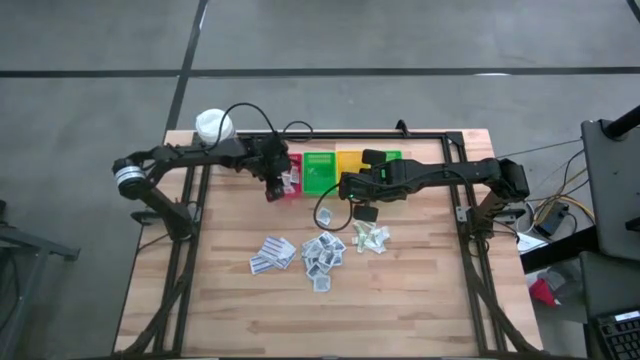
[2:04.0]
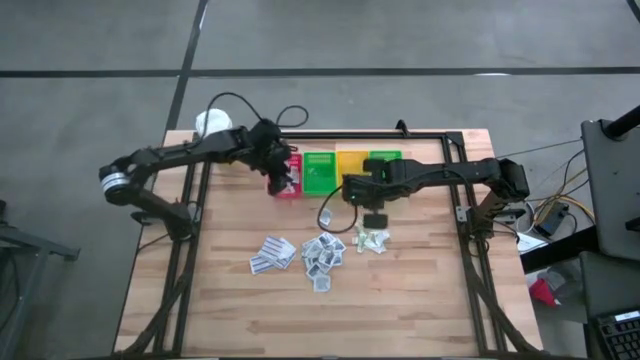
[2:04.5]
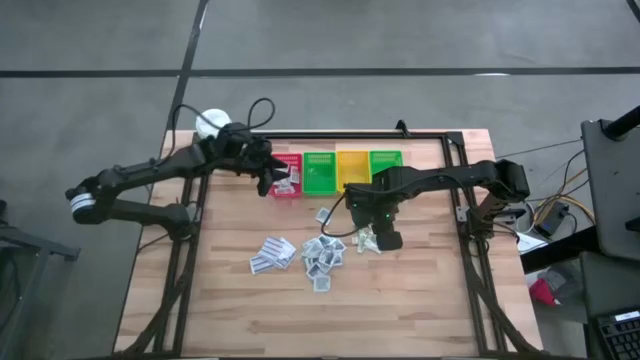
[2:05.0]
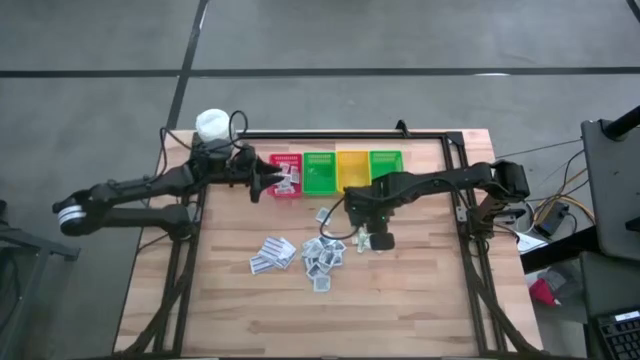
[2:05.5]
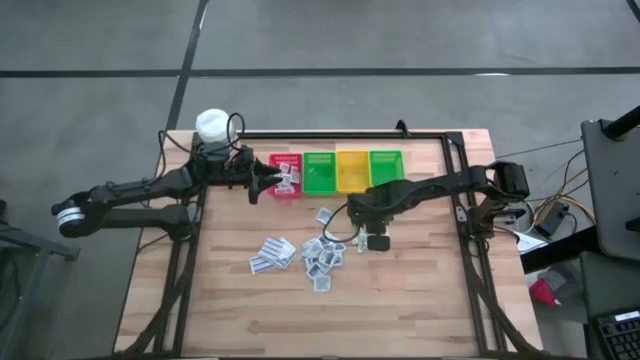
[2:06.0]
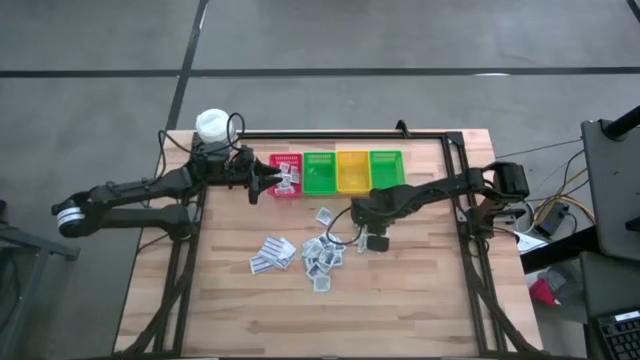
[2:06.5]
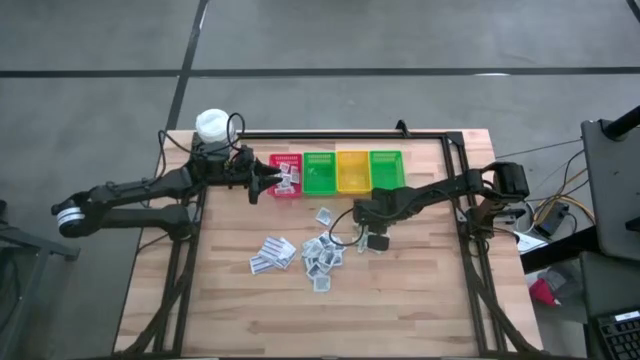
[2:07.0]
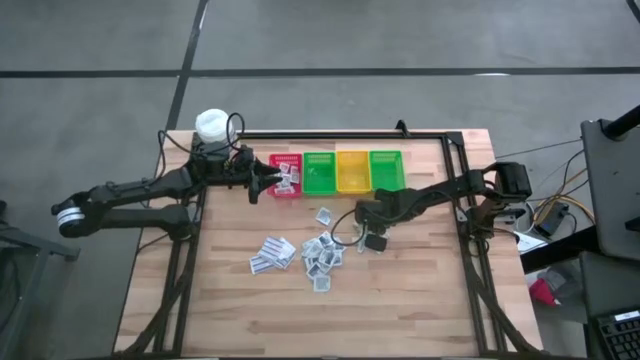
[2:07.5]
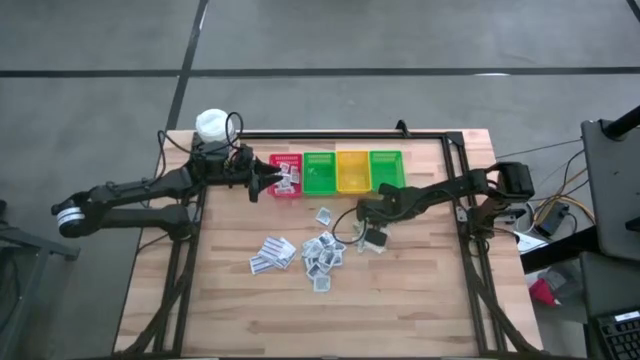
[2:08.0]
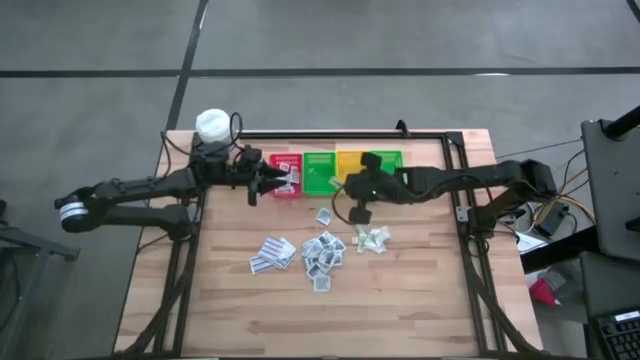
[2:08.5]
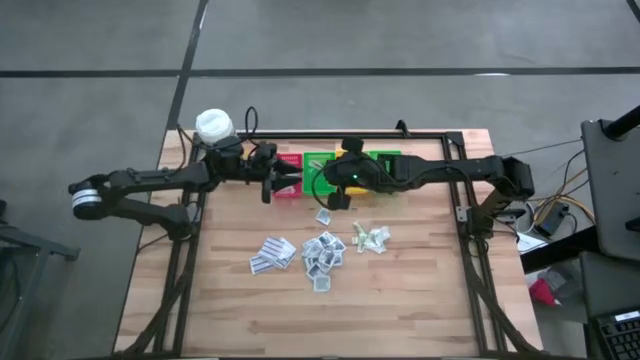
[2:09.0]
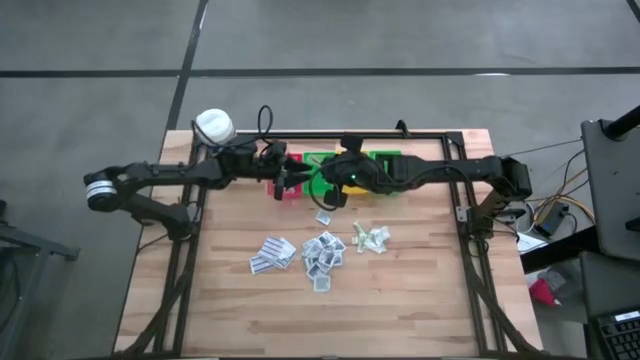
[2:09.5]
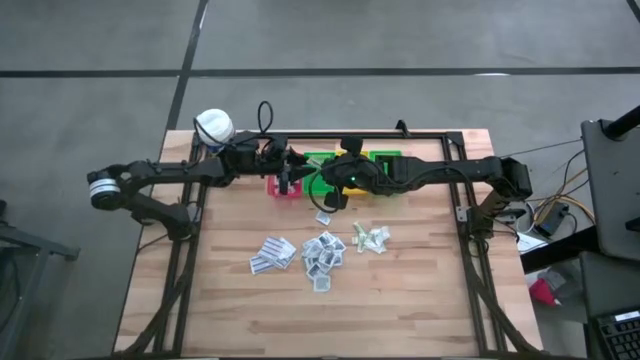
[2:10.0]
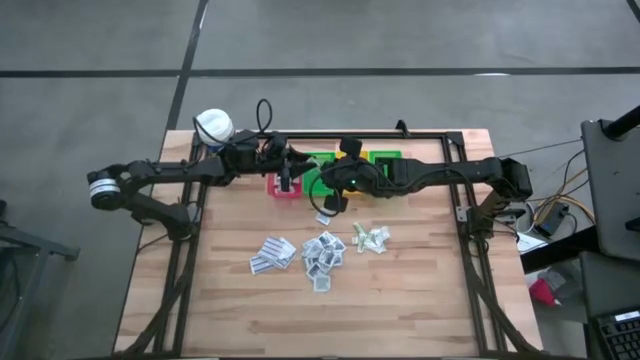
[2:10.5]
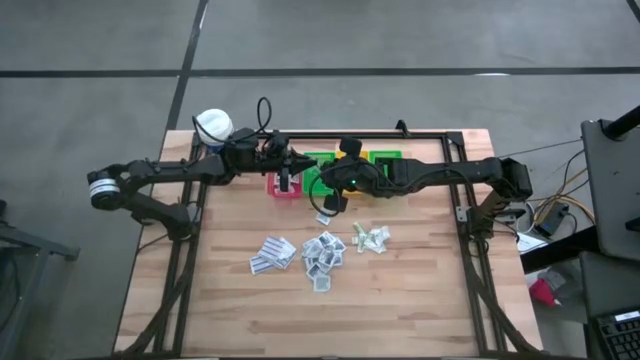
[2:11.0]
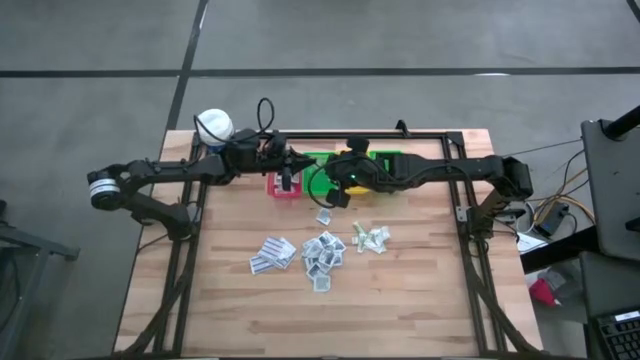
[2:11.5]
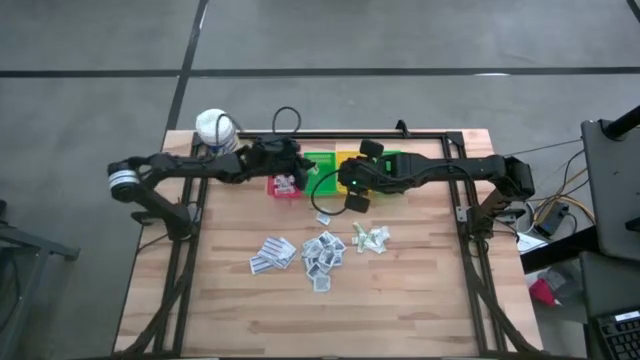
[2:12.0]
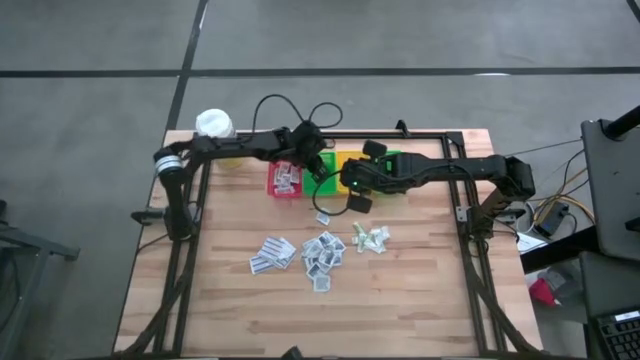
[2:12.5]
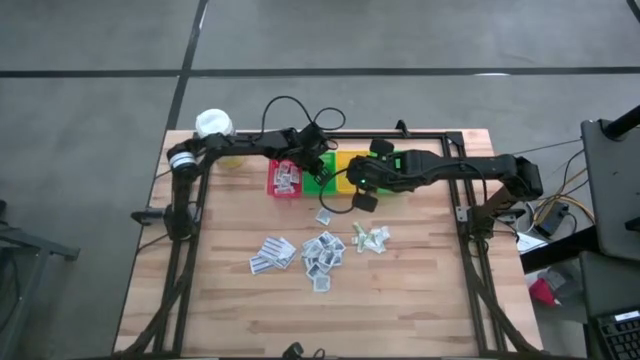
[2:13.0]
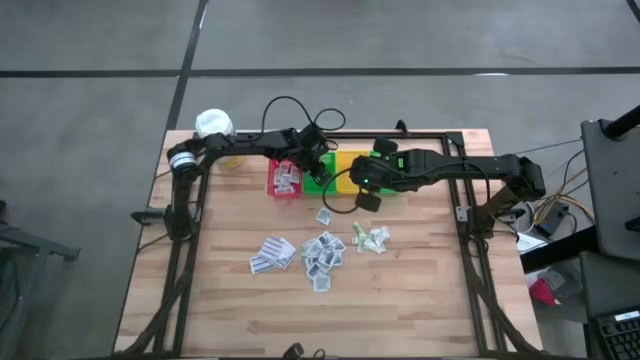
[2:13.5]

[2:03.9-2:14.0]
Task: Pick & Place First Aid Supplies
Put the green bandage into the left green bin

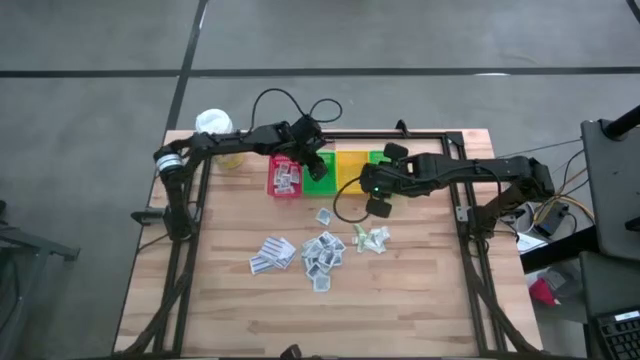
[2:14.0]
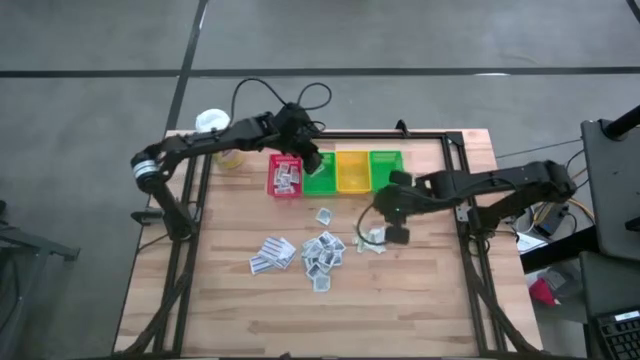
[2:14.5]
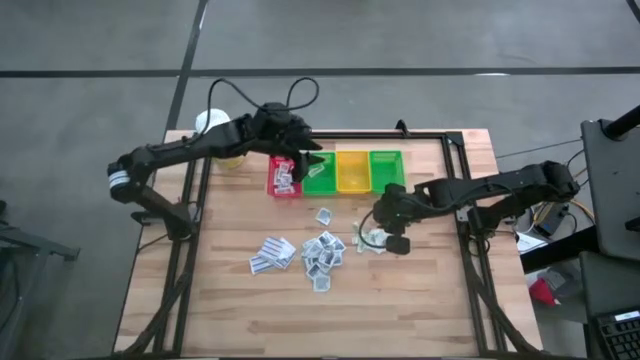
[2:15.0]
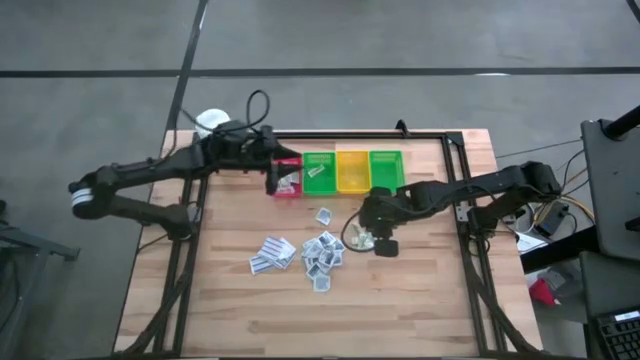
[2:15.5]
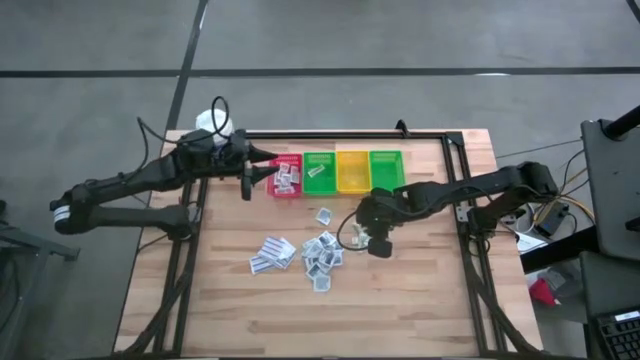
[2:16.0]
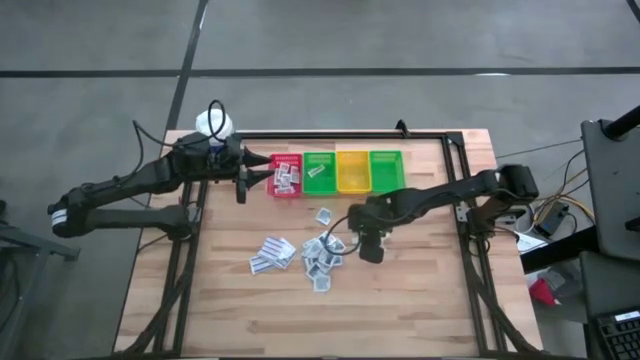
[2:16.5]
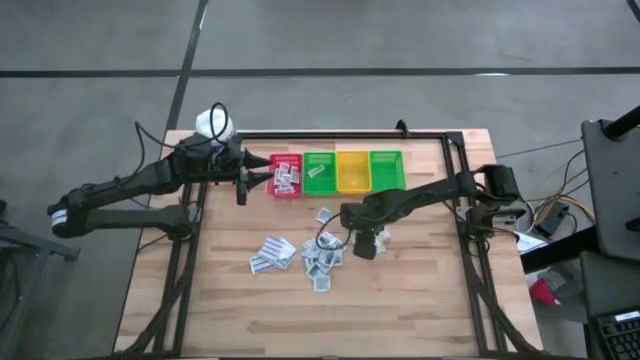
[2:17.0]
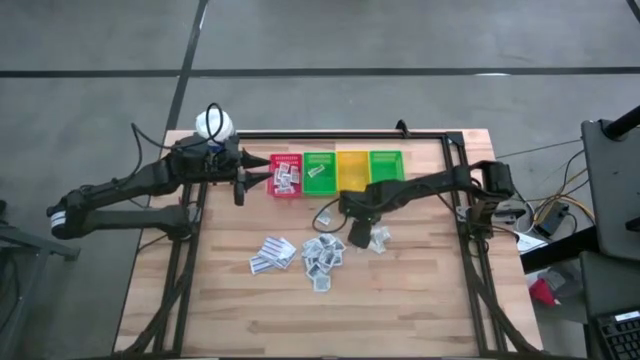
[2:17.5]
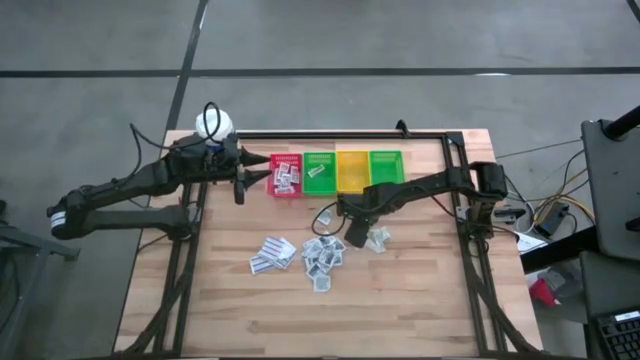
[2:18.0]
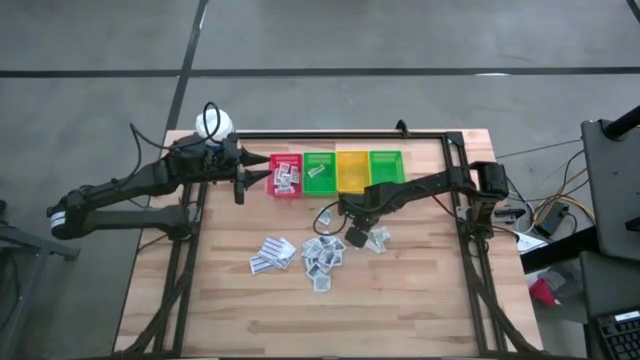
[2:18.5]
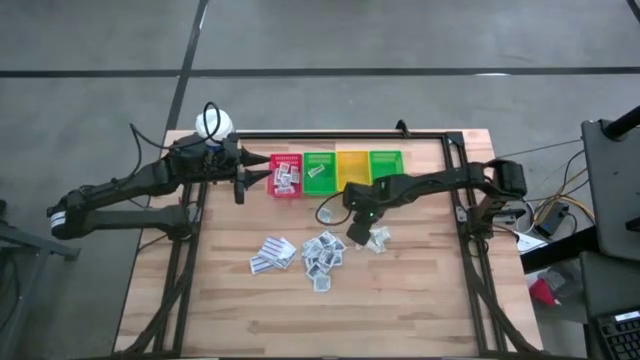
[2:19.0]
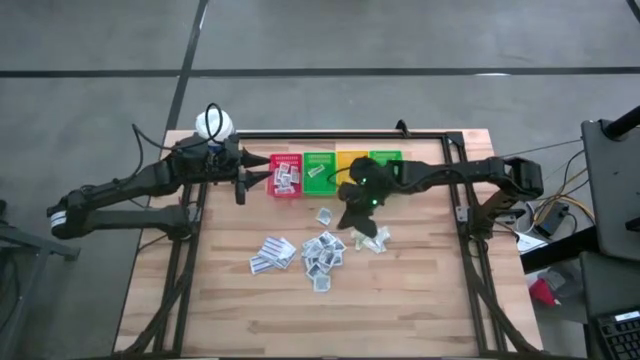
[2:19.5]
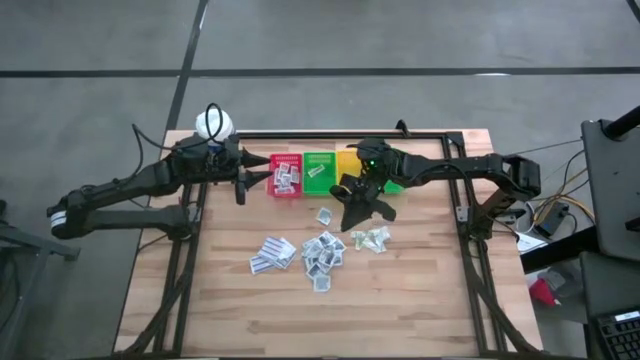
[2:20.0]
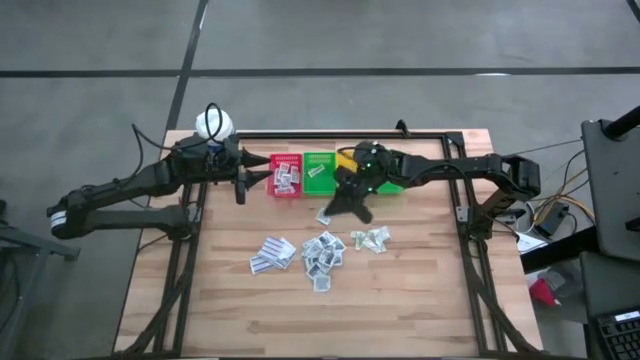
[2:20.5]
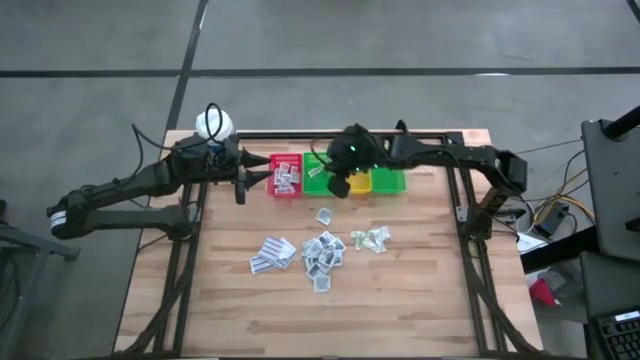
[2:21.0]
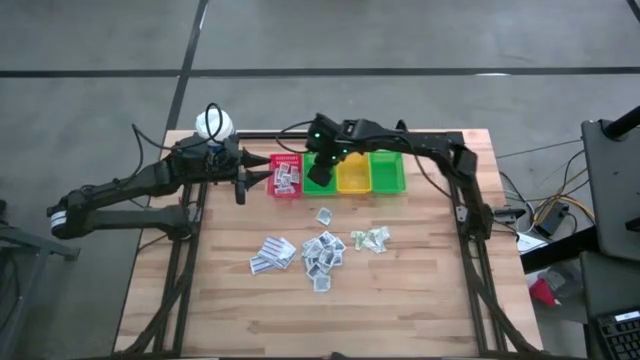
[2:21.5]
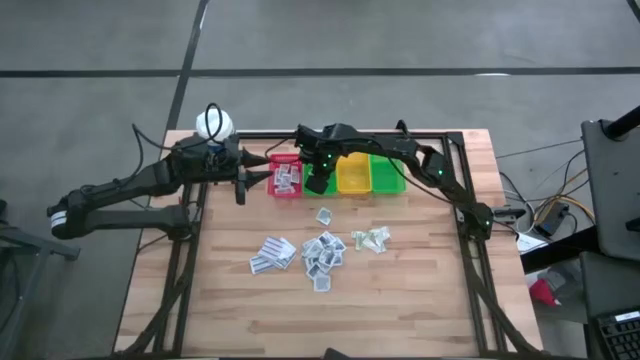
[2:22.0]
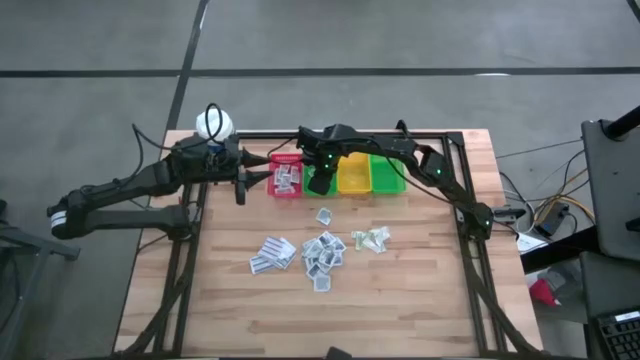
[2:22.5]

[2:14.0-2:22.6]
Put the green bandage into the left green bin
